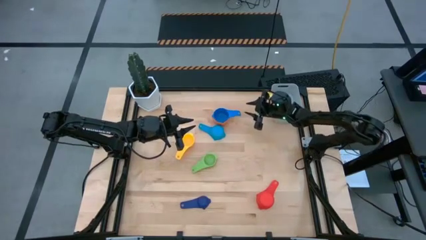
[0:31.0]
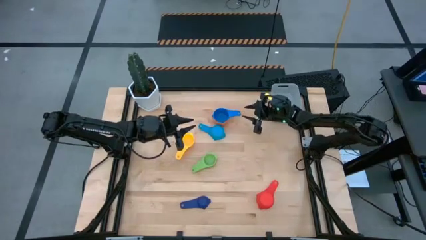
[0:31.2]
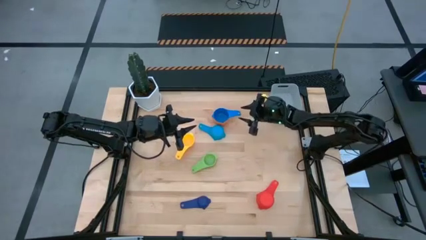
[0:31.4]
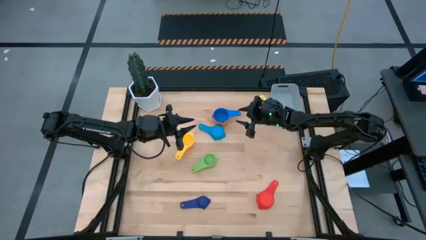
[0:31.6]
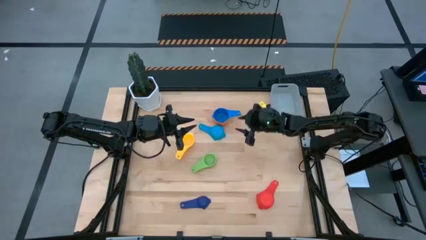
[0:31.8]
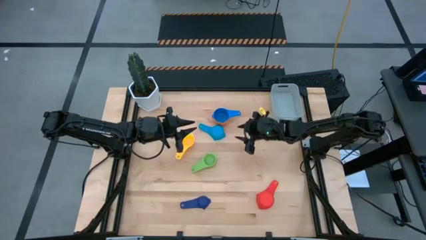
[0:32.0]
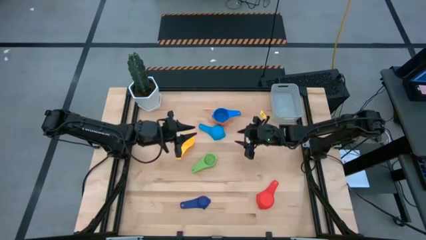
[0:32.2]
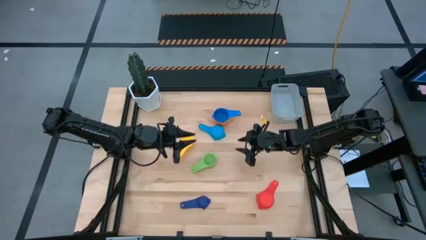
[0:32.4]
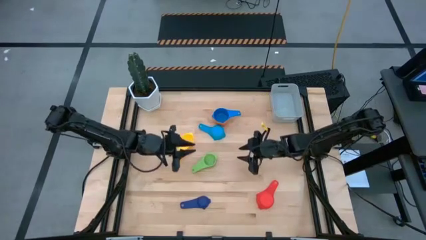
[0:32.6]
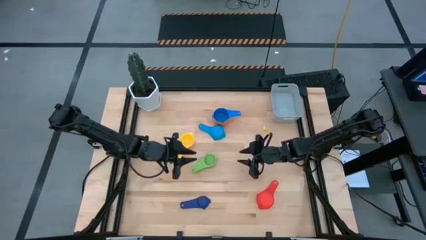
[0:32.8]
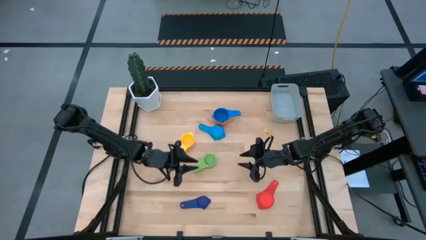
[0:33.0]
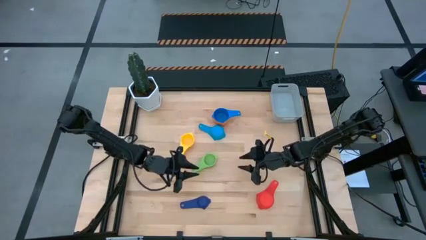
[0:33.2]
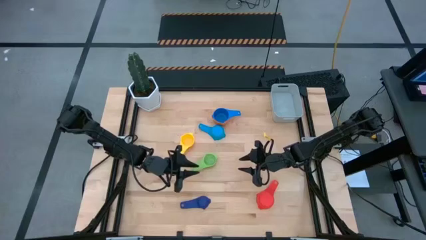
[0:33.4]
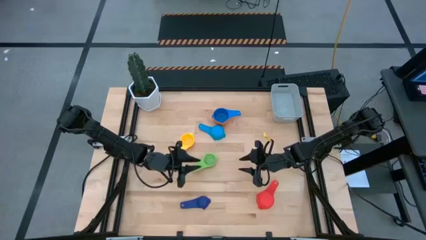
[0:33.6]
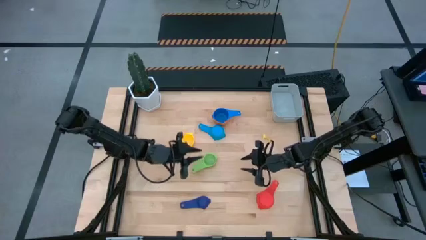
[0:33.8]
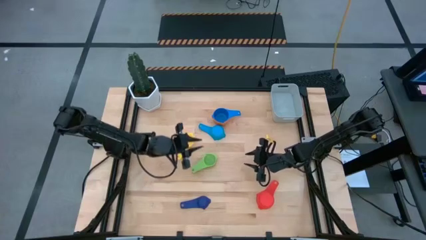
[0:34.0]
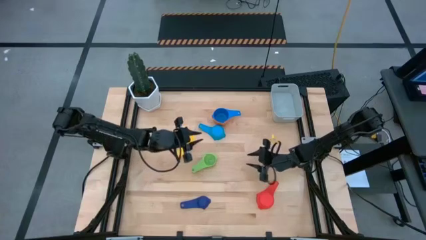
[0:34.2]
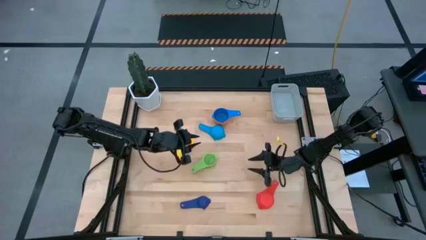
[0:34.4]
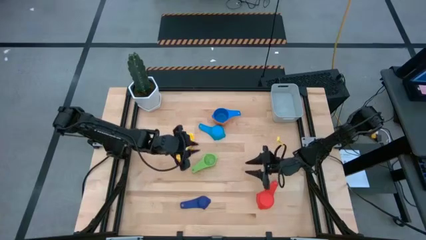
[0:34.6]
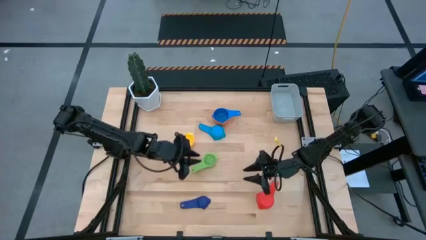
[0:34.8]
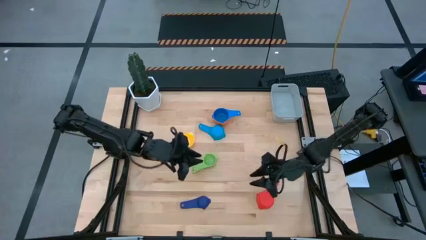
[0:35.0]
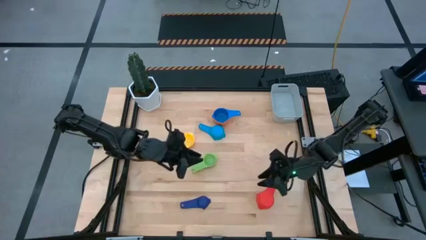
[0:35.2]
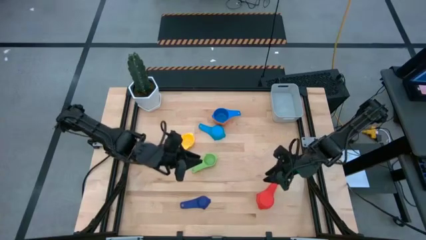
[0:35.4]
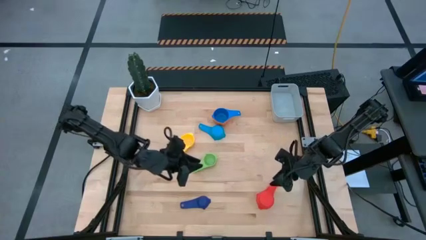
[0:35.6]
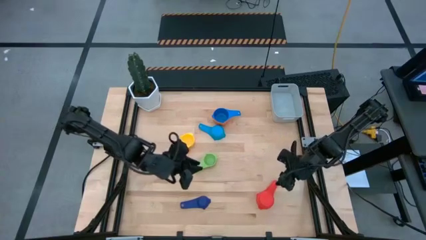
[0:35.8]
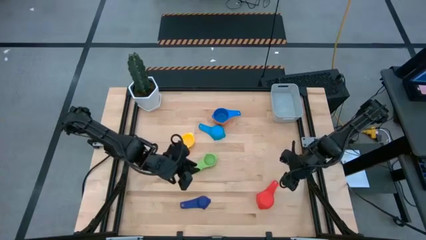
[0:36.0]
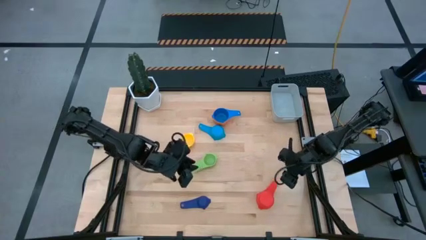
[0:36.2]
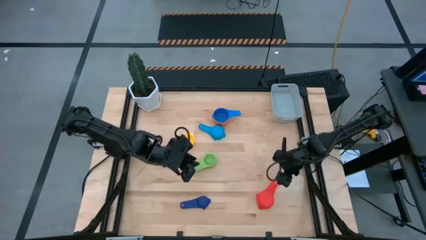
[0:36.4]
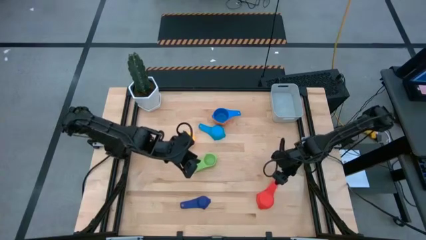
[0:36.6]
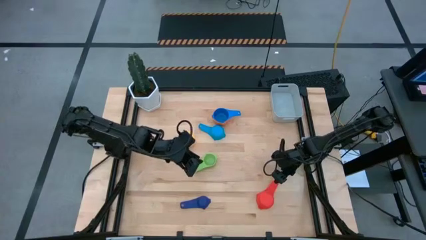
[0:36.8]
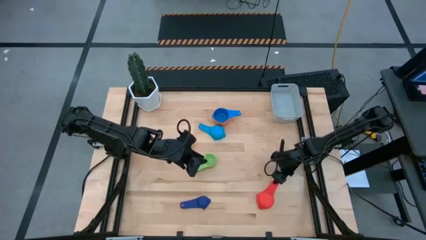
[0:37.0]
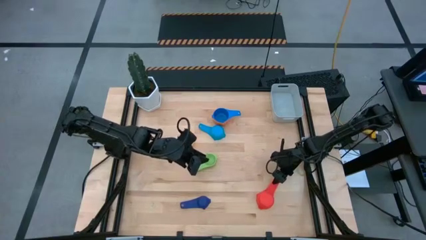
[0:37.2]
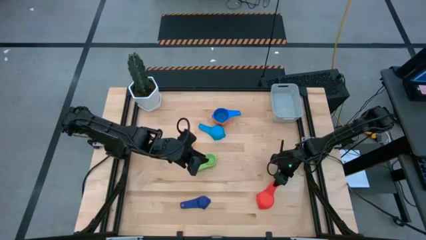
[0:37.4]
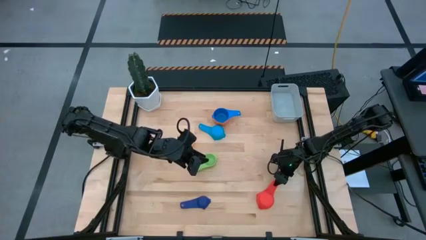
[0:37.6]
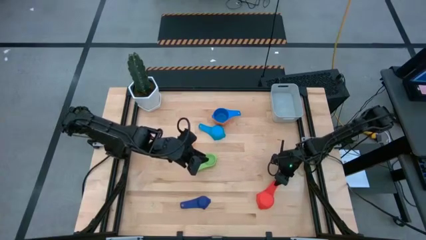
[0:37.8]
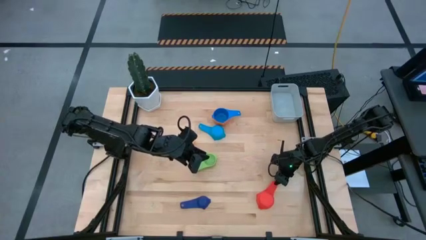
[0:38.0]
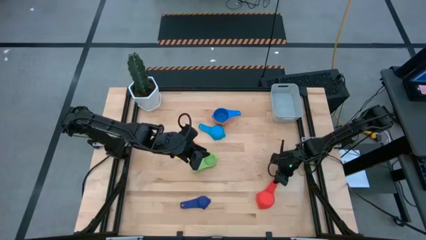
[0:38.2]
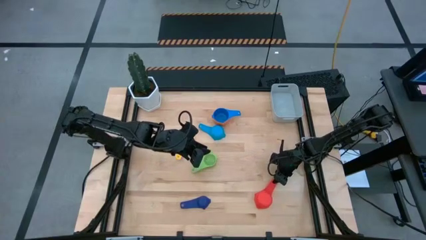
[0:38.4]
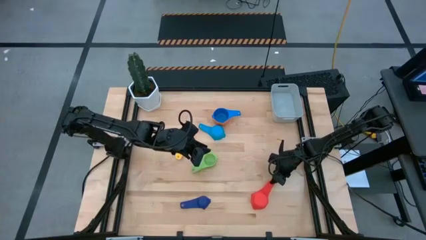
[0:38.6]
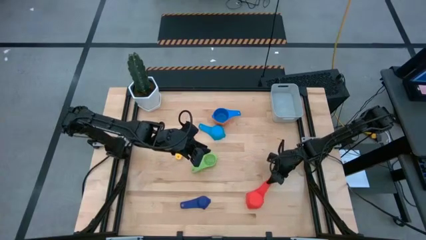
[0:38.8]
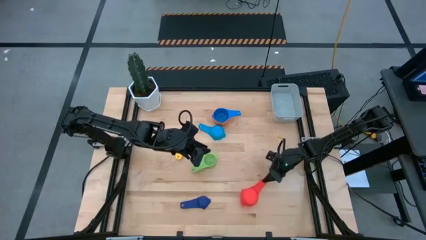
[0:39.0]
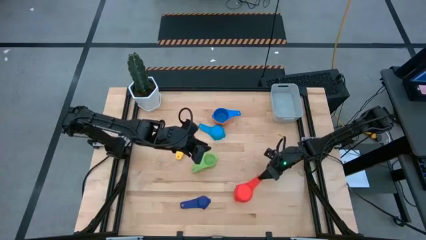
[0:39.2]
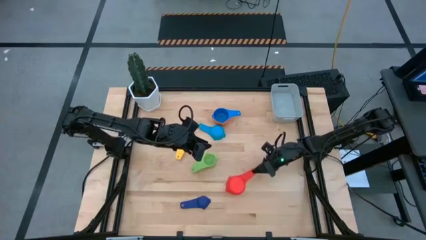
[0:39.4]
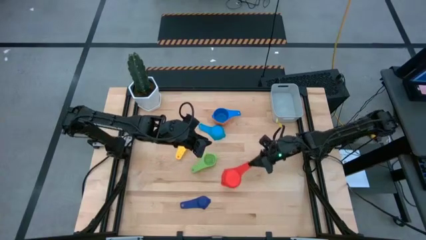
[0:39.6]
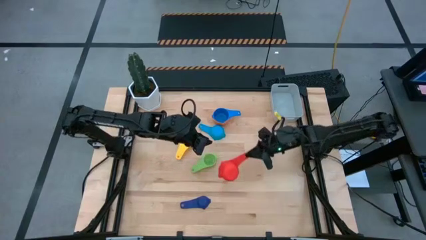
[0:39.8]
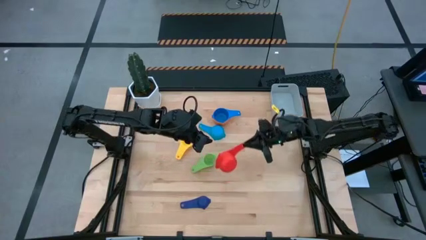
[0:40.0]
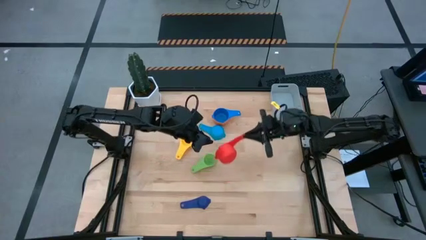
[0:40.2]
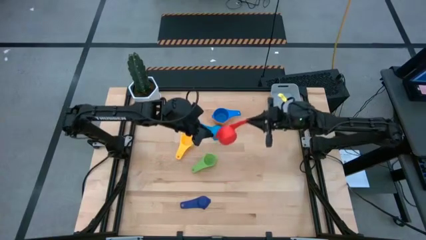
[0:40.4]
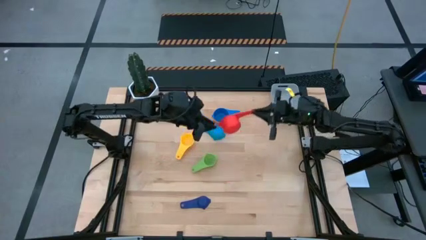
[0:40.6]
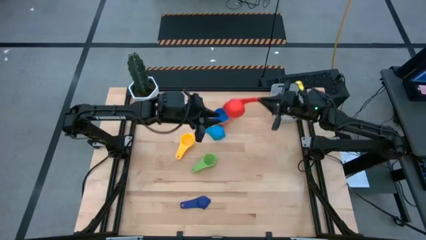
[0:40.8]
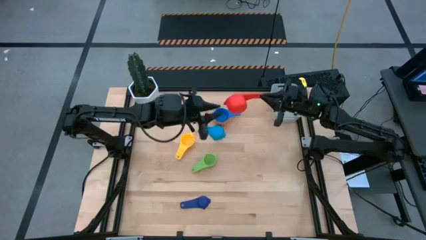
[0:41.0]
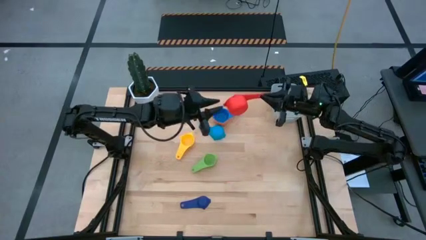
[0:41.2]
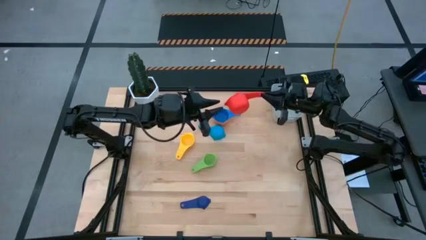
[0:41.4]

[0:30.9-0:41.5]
Task: Nest measuring cups in basket
Stack the red measuring cup on top of the blue measuring cup

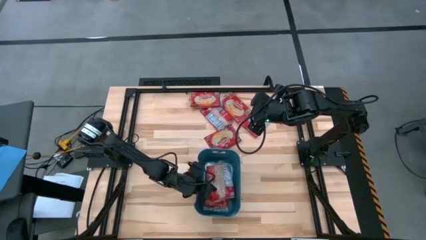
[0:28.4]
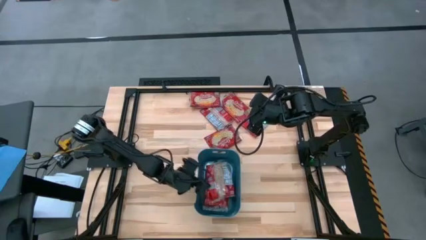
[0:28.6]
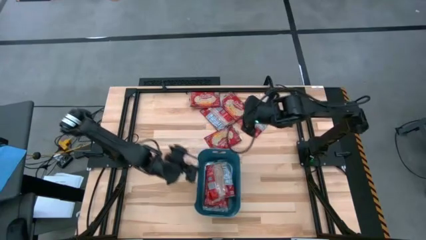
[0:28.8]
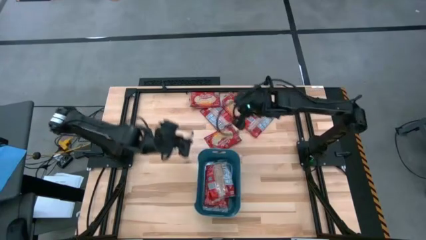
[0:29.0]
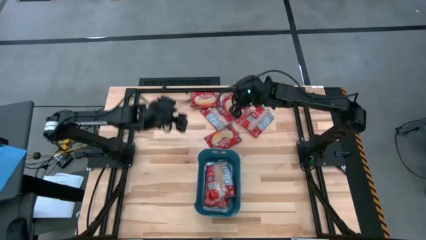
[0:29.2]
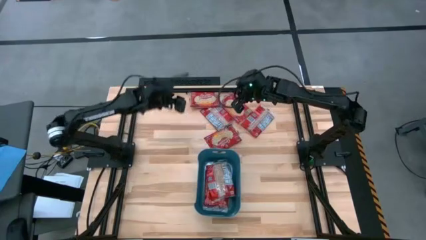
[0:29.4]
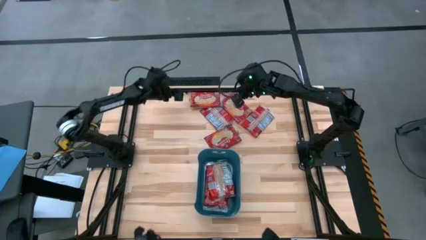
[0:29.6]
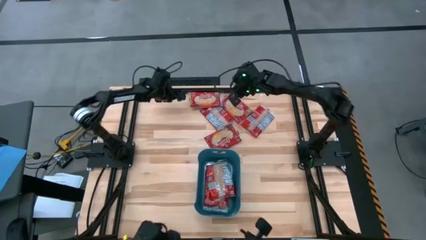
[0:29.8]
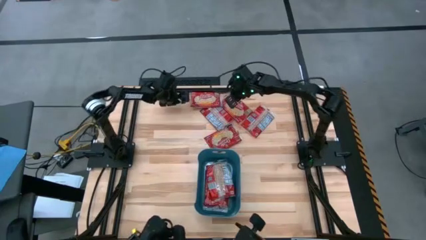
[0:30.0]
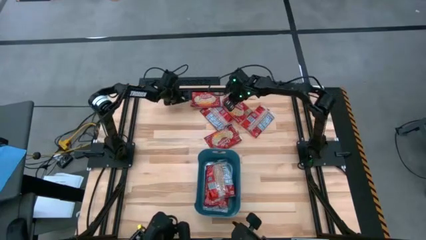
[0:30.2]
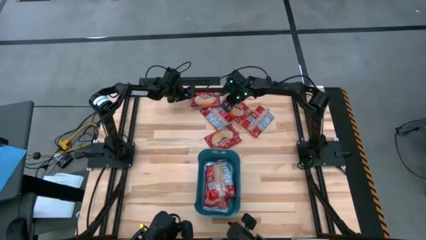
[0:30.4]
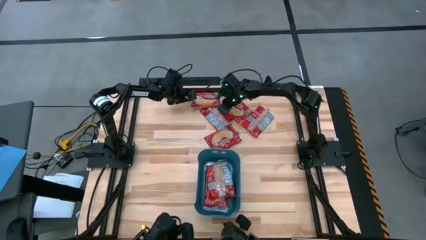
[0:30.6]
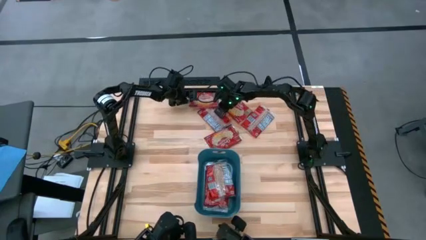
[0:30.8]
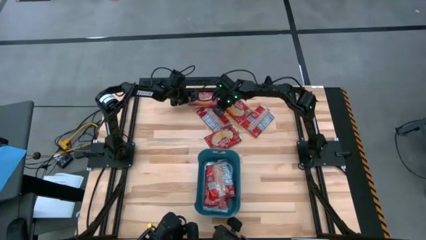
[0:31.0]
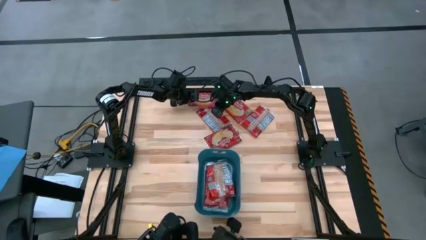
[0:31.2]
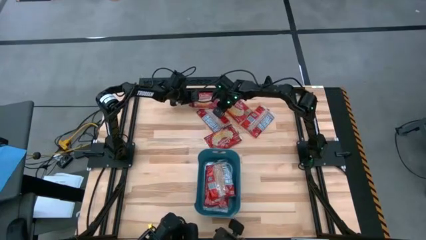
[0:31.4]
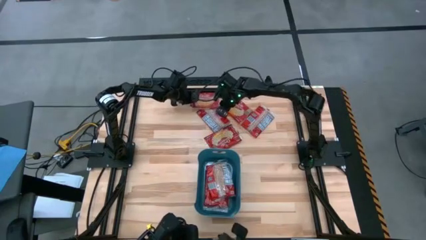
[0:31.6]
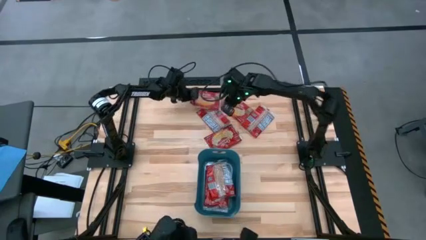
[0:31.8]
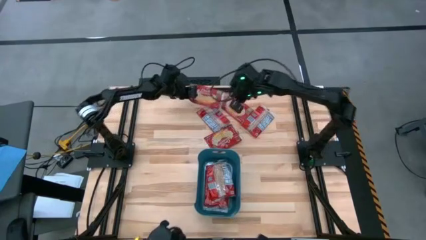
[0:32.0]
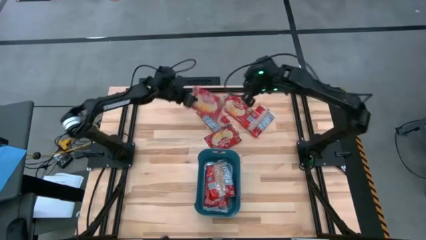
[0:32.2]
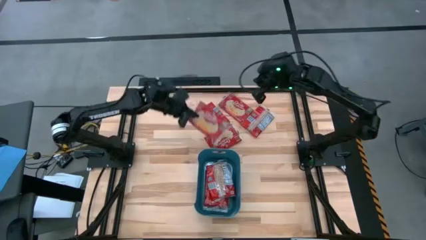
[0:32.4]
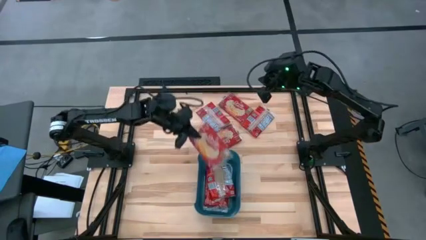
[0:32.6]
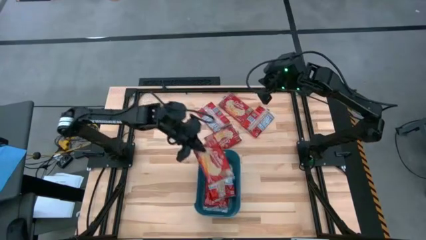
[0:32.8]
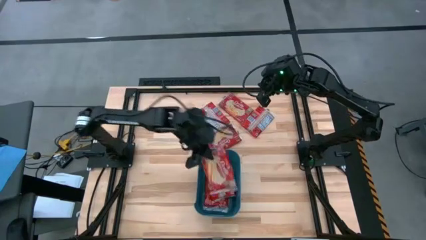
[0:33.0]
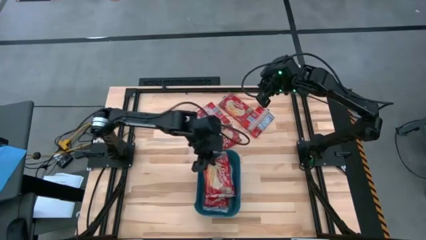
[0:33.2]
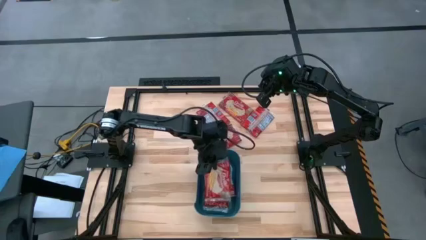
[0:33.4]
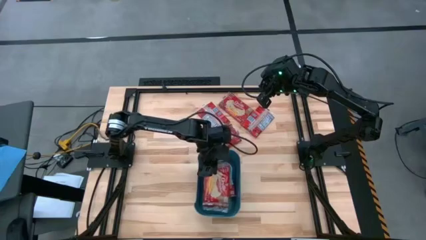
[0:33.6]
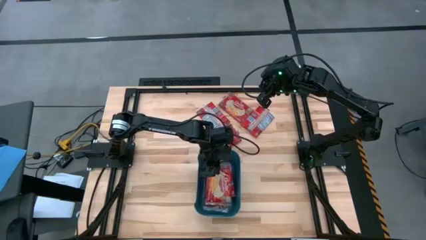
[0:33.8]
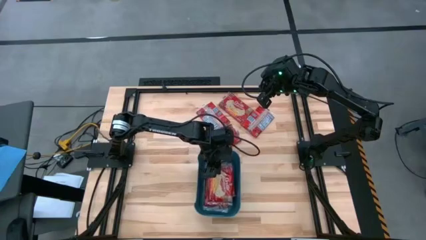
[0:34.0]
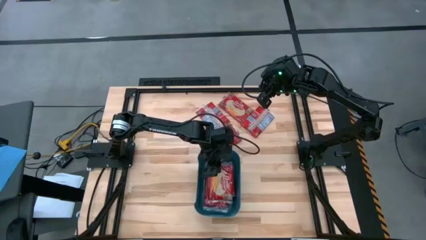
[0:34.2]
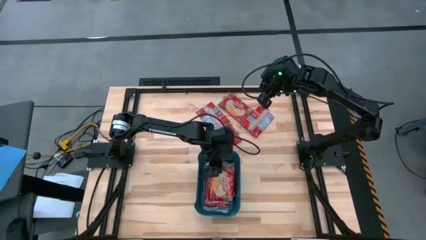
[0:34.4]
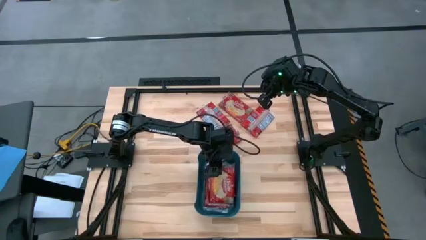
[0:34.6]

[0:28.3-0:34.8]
Task: Sort popcorn bags into baskets
Put the red popcorn pack into the blue container
